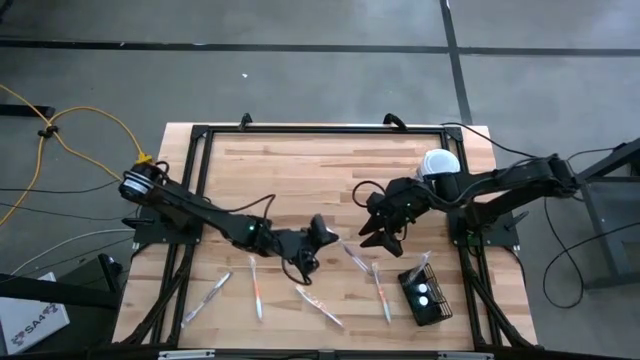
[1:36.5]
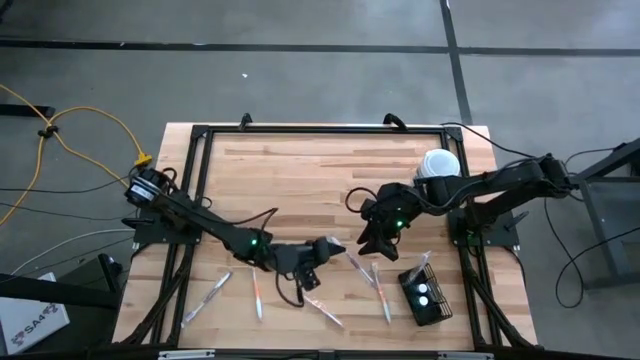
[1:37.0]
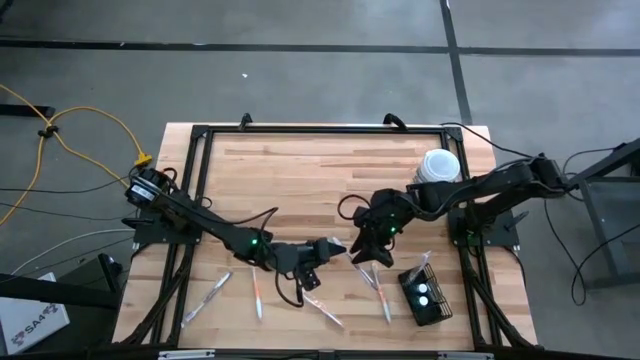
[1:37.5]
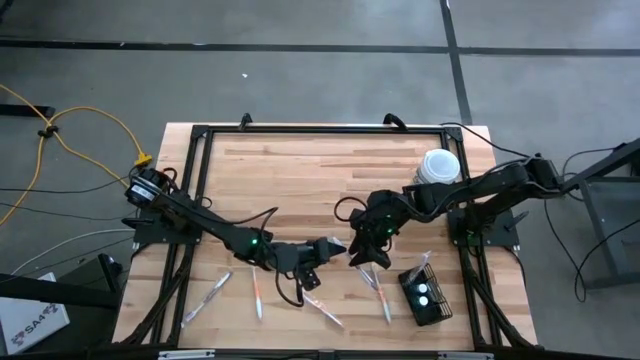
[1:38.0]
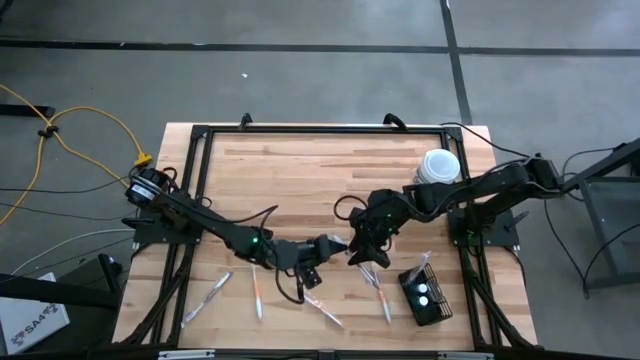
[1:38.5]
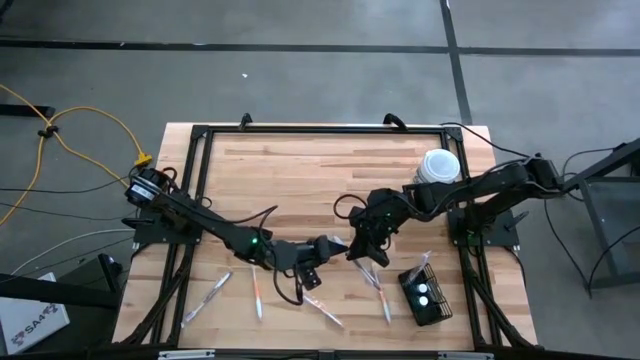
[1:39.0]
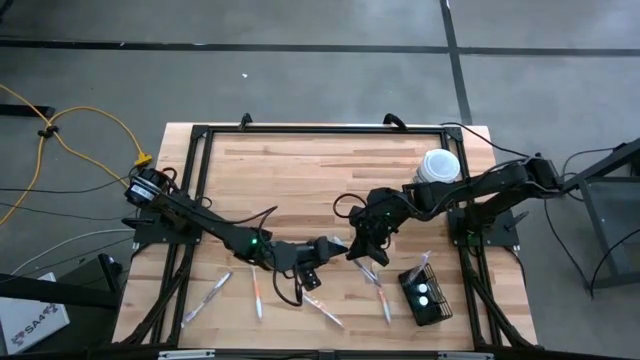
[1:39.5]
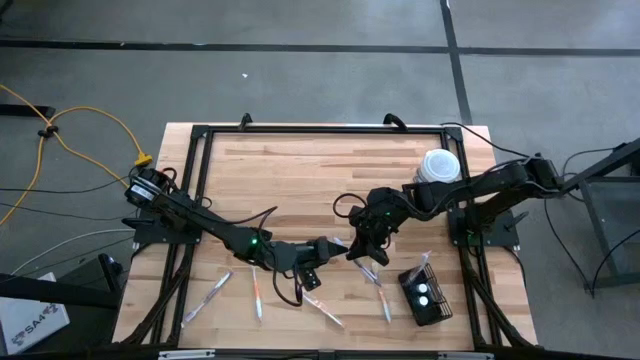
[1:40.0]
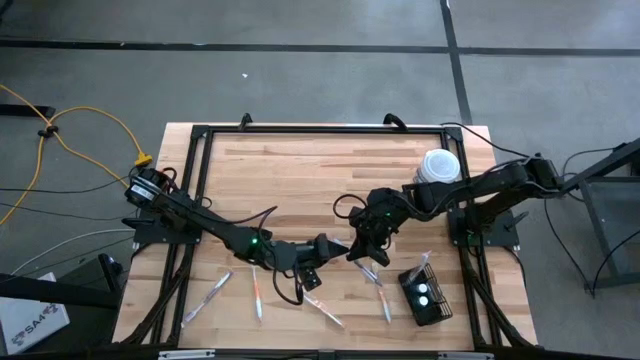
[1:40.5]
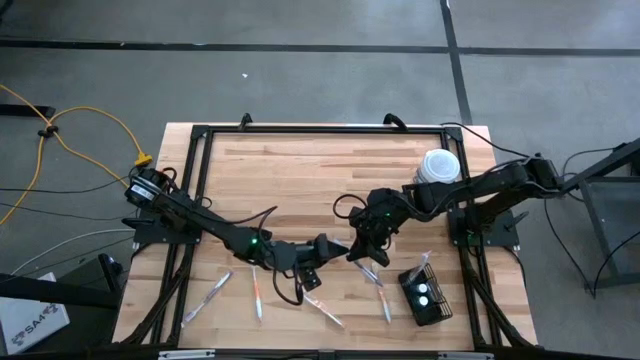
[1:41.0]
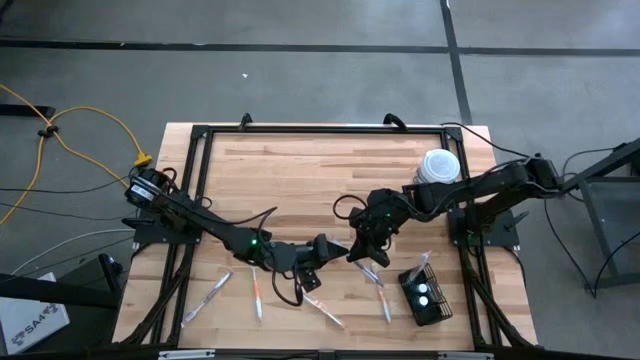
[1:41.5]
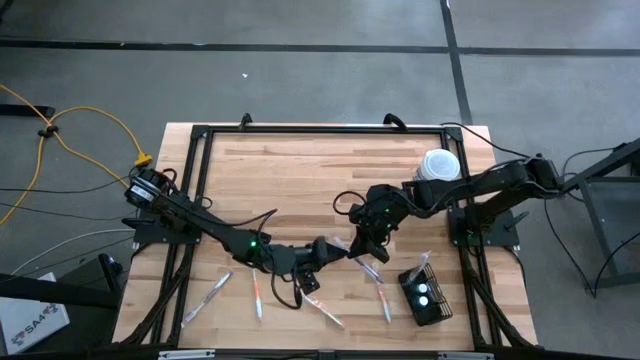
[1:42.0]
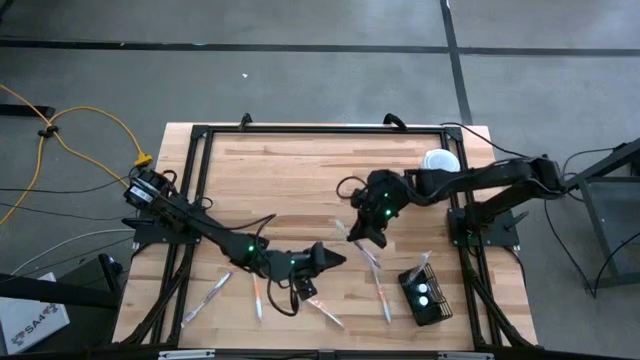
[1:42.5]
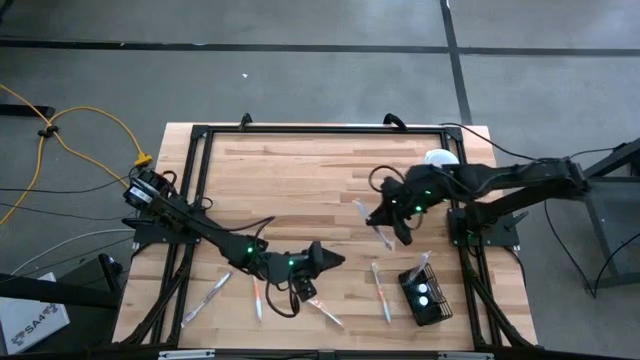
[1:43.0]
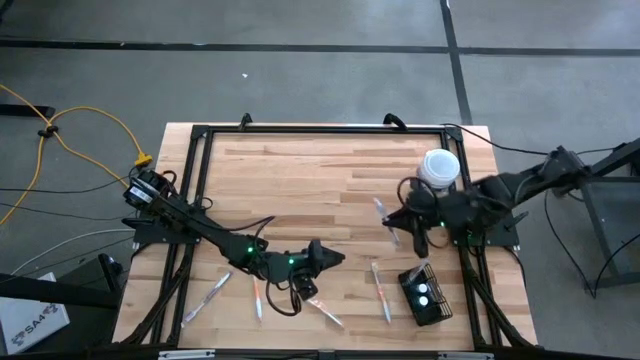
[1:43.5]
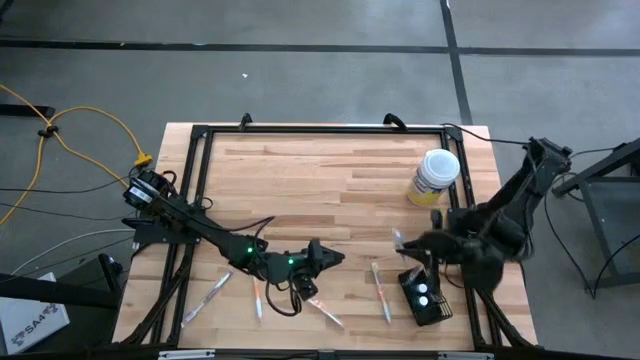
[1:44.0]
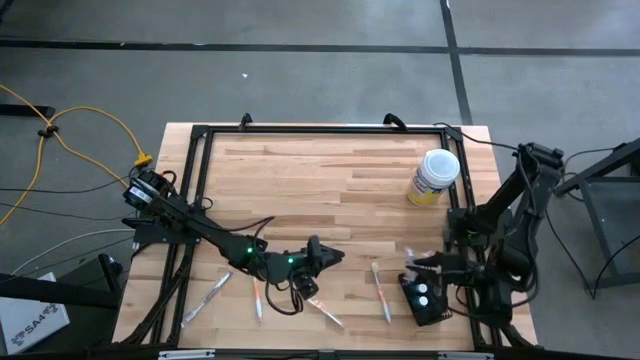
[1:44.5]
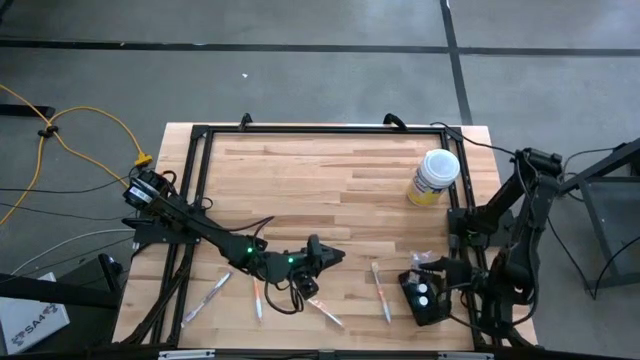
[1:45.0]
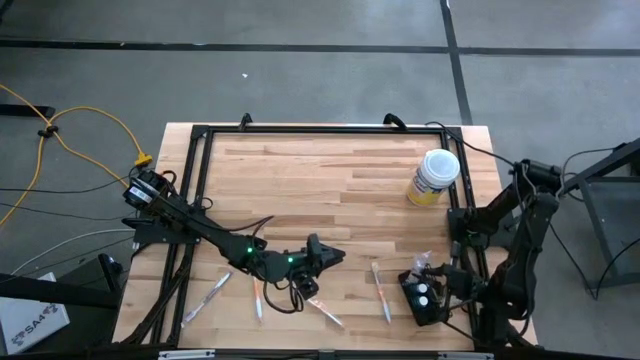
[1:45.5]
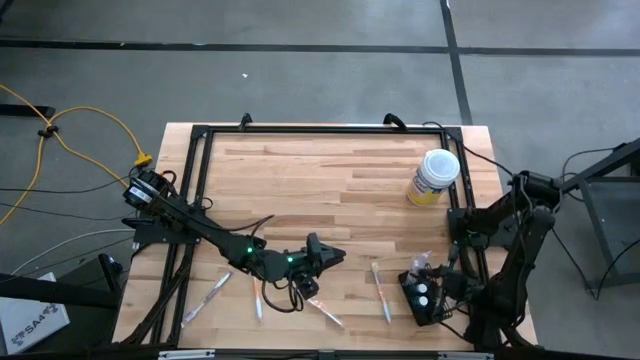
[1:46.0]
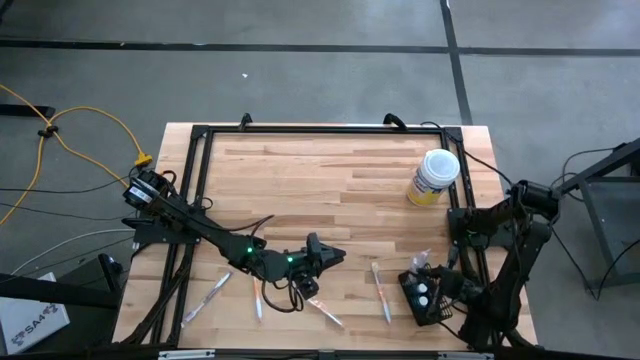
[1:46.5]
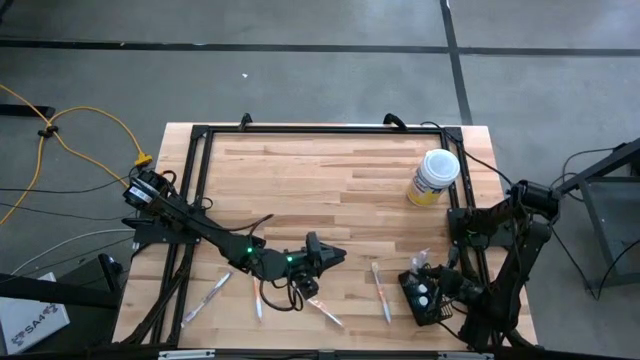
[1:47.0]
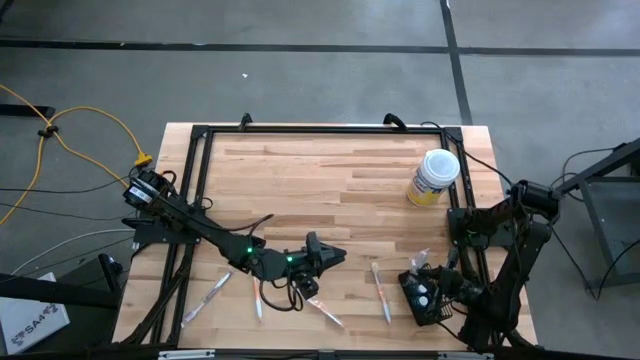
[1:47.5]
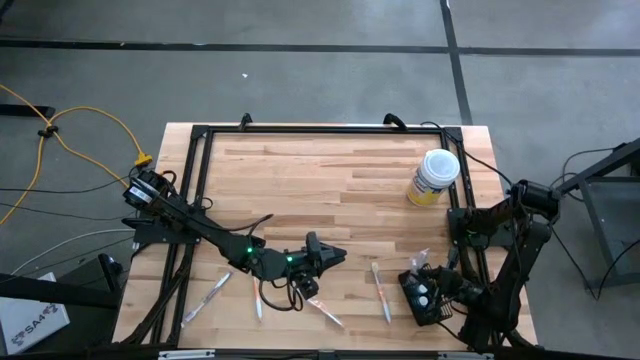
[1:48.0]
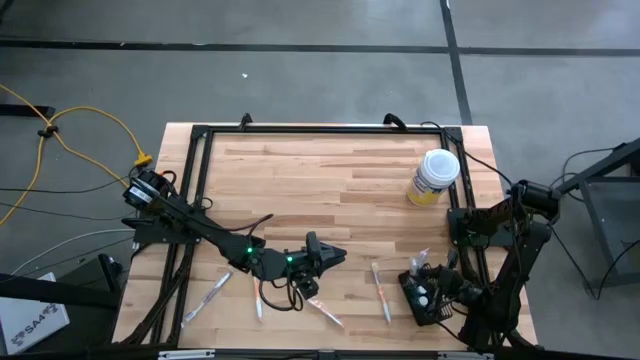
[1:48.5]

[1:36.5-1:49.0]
Task: Pick & Place toothbrushing station
Put the purple toothbrush into the mesh organizer
